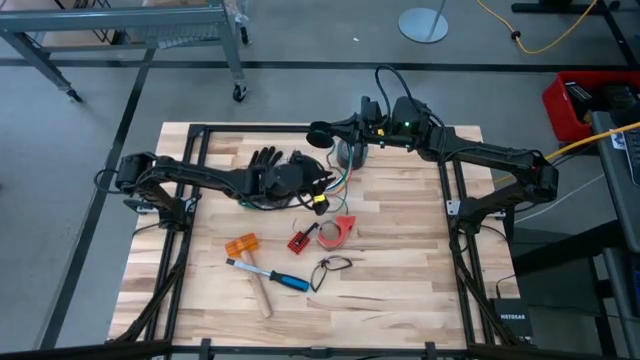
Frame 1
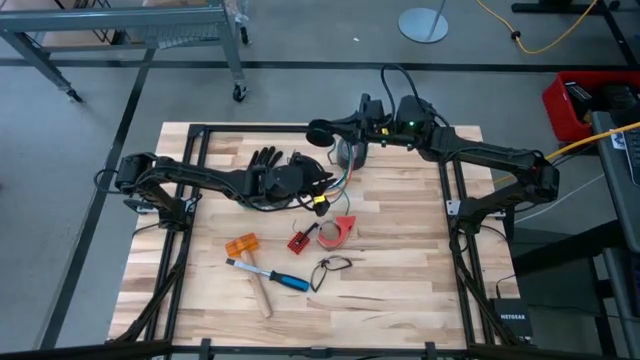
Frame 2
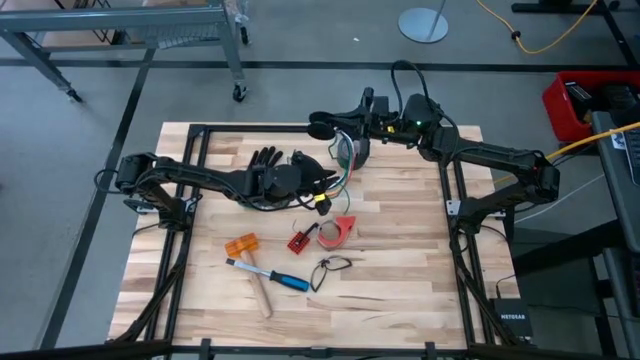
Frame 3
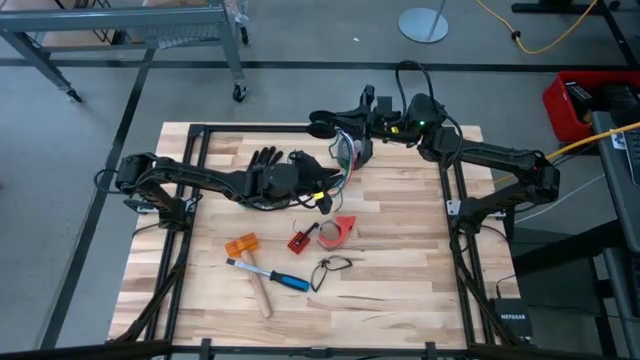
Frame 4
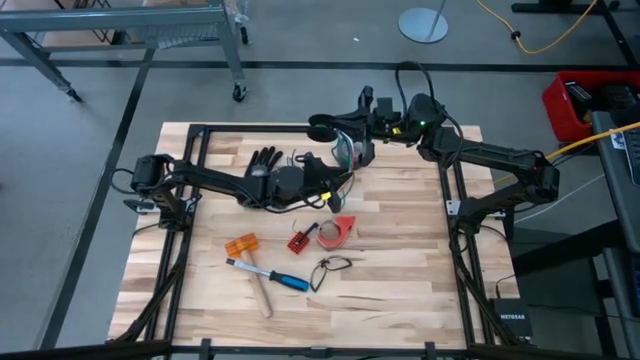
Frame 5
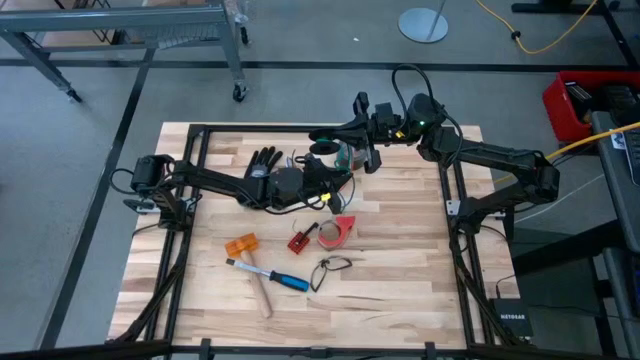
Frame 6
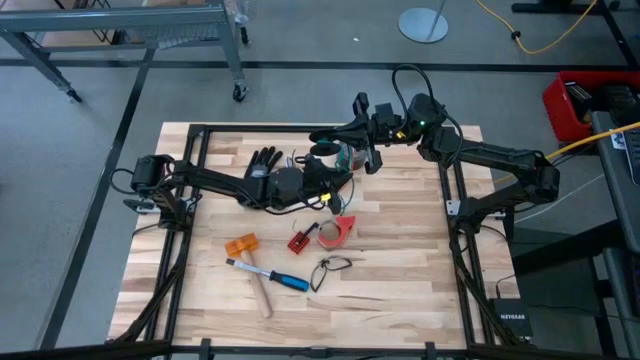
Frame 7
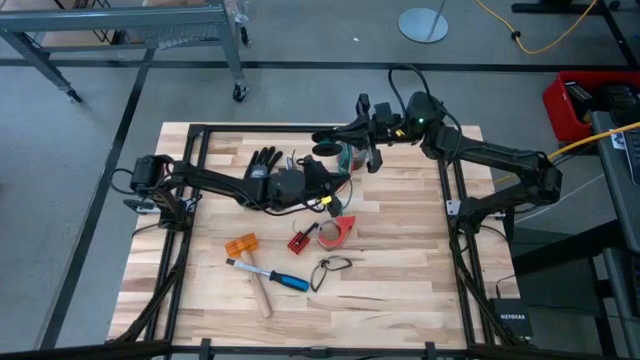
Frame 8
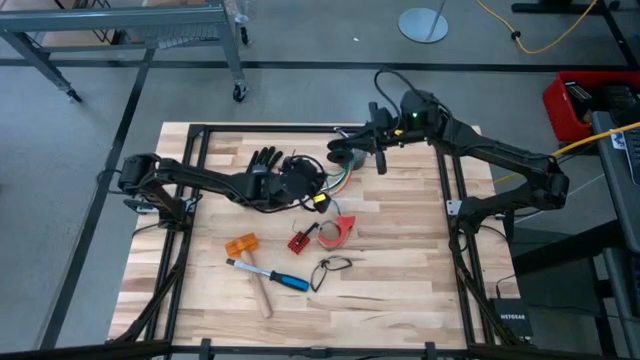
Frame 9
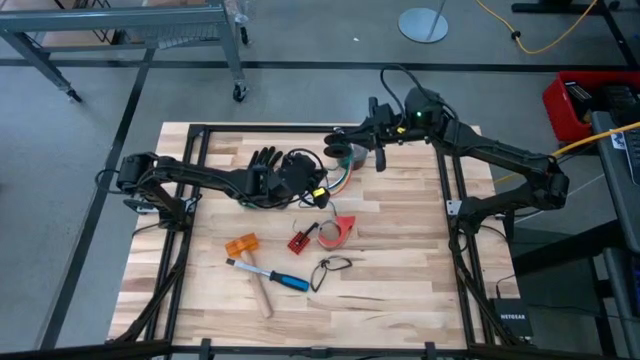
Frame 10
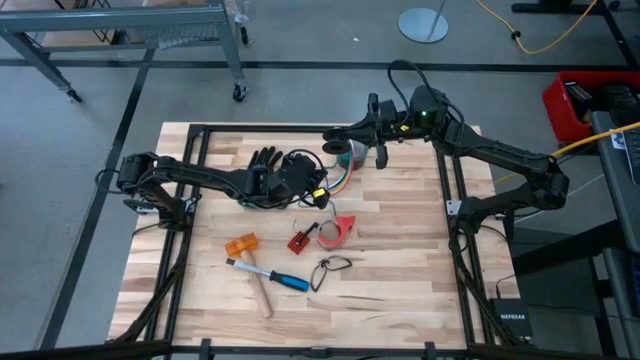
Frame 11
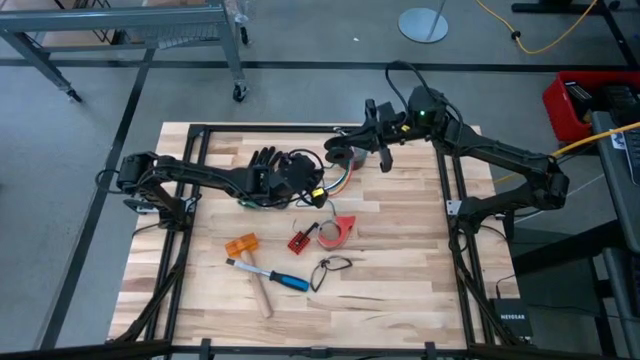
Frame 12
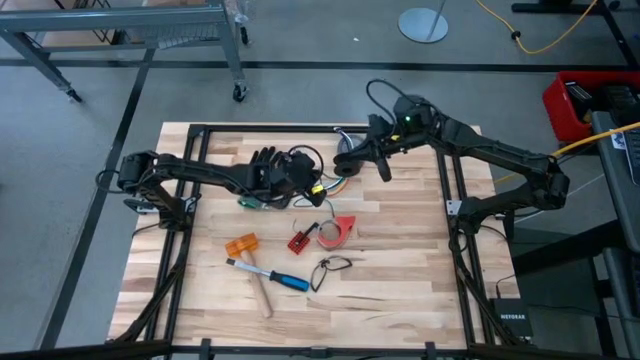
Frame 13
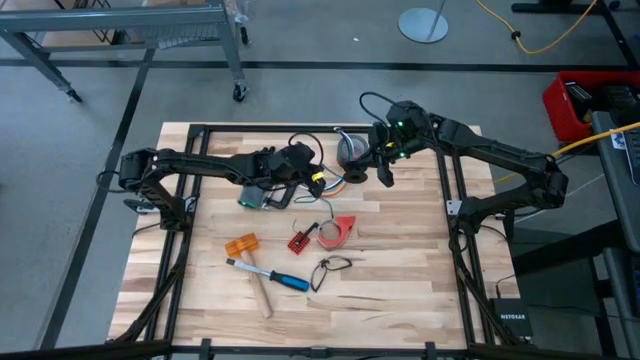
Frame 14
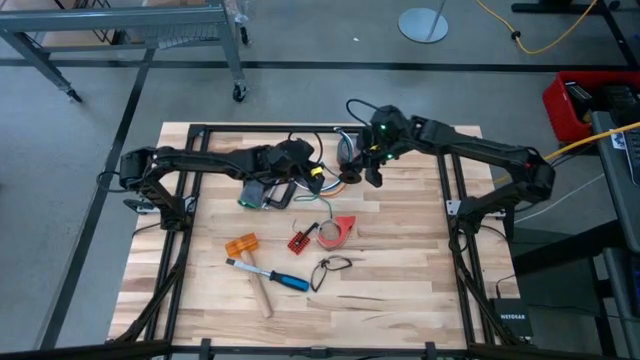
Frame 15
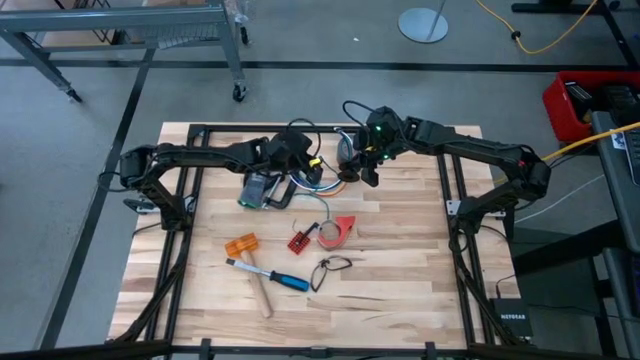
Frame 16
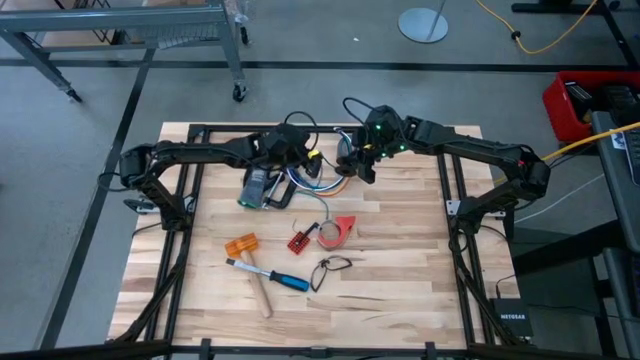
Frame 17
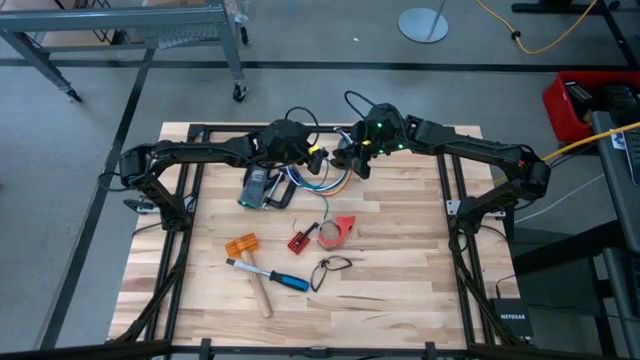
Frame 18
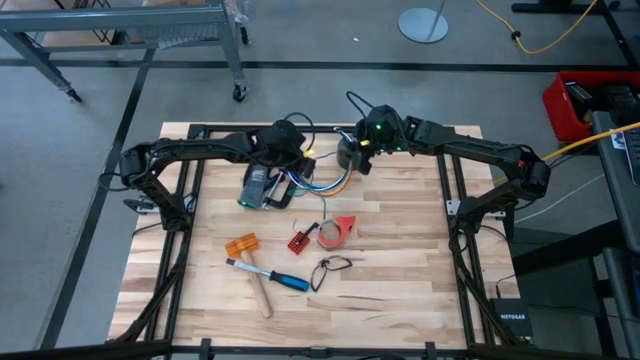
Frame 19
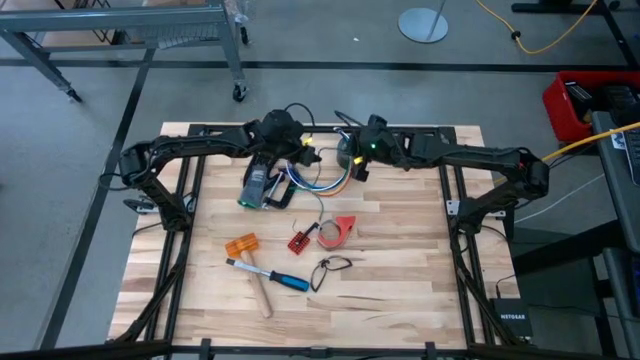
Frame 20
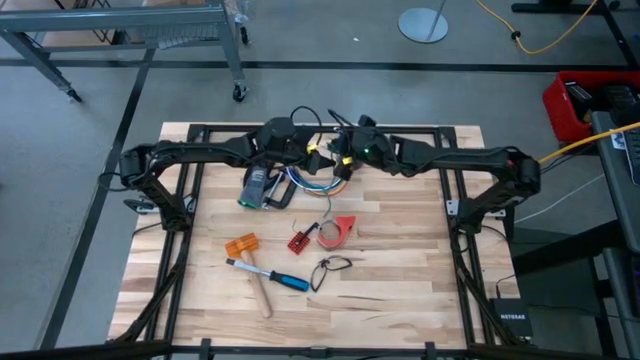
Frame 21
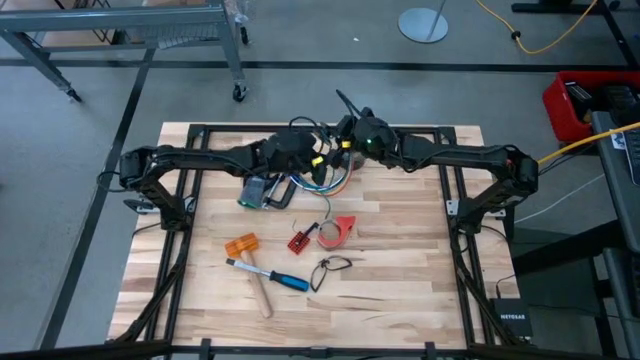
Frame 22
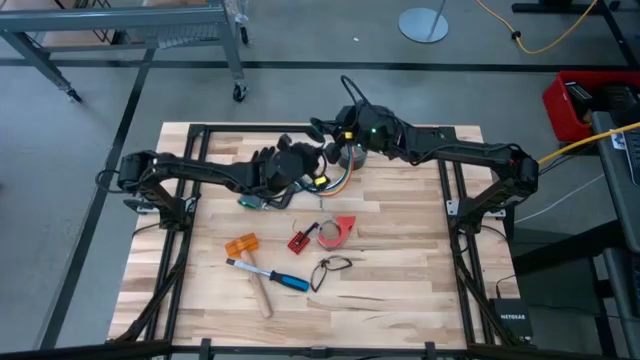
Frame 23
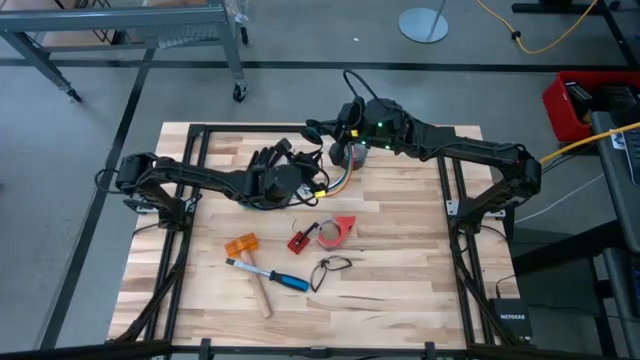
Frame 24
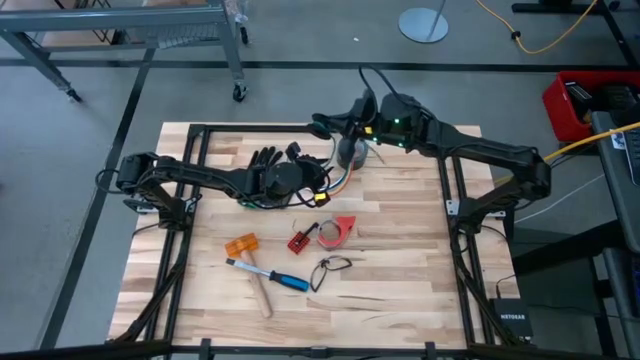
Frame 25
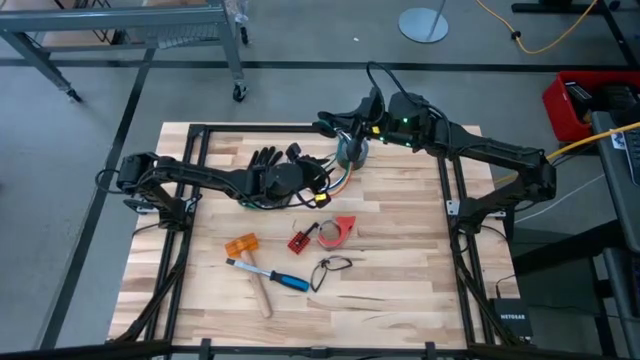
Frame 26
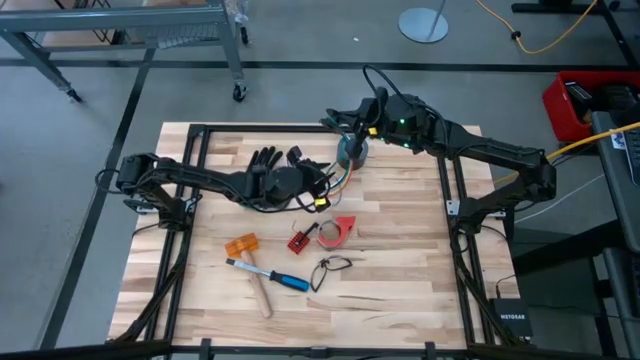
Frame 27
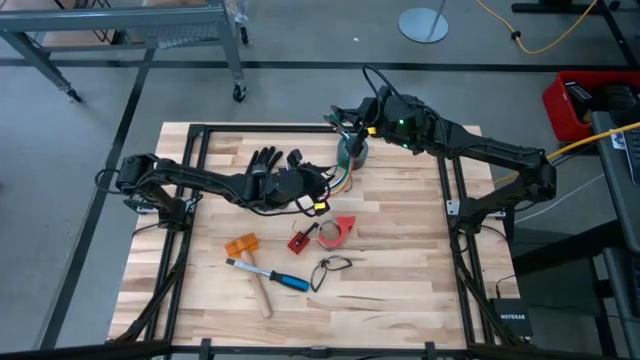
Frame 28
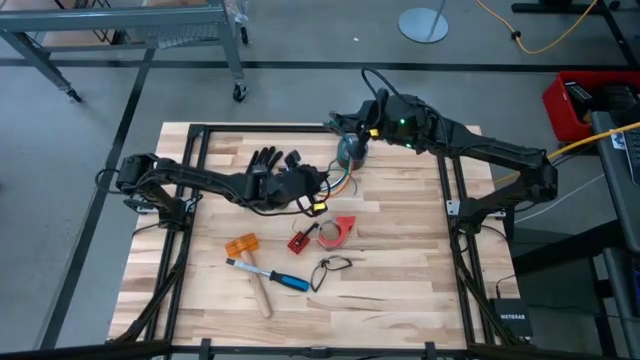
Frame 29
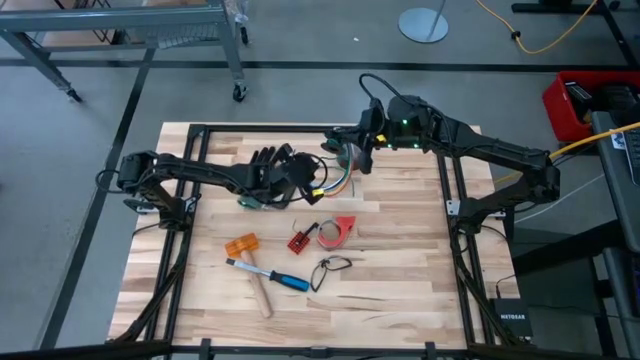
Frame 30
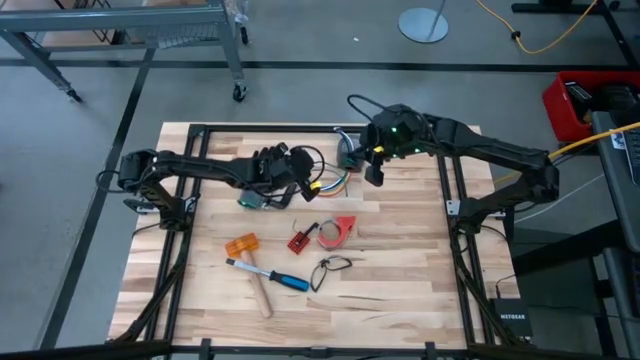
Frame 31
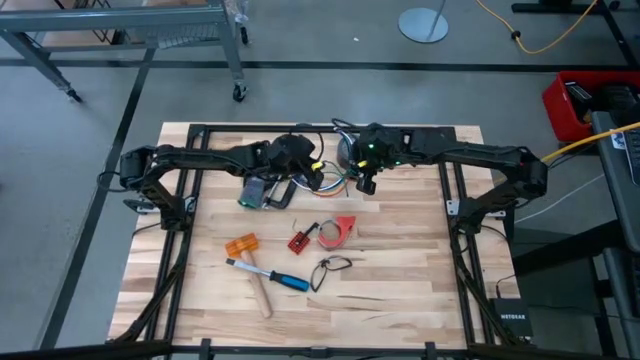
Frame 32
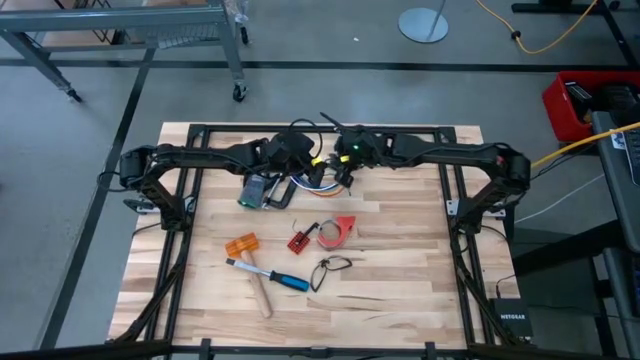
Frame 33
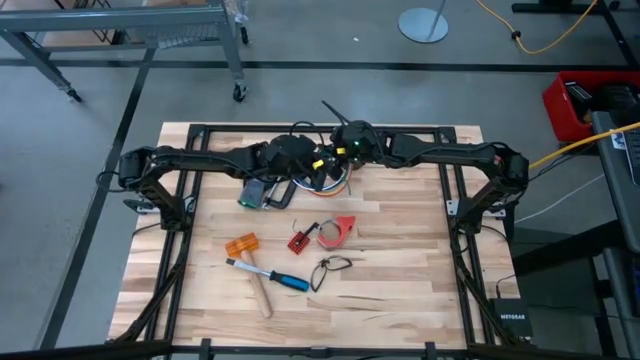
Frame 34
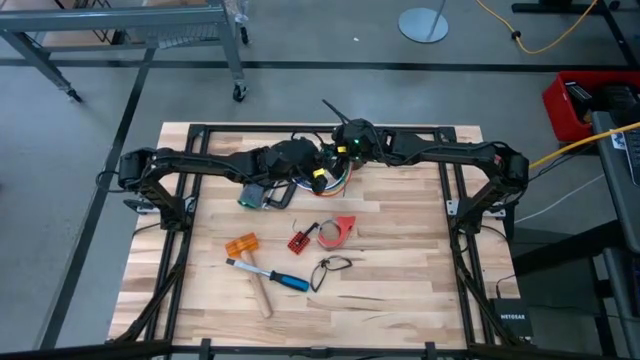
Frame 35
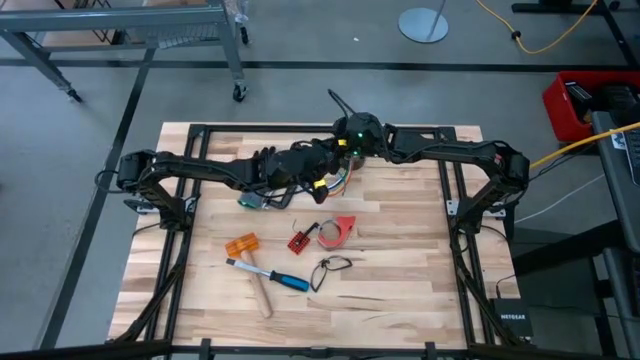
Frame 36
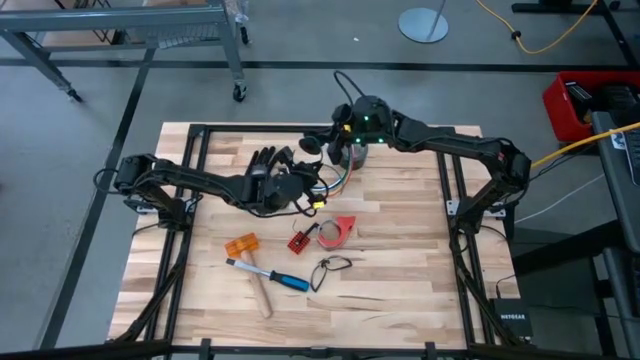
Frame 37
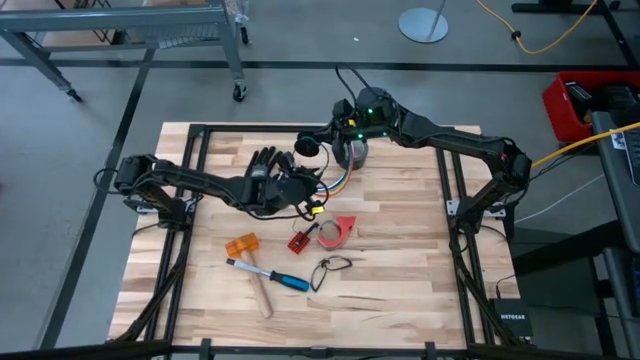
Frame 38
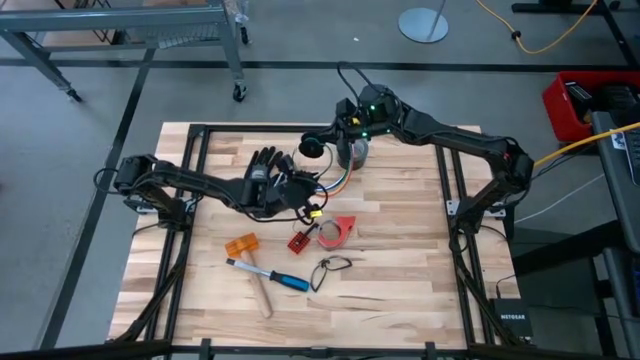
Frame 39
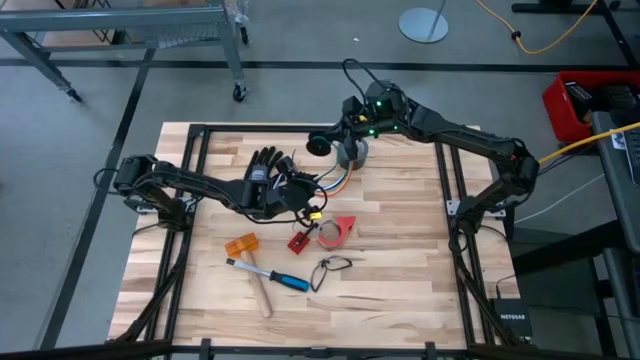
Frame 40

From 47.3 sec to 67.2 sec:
Task: Coil cords
Coil the wire onto the spool
